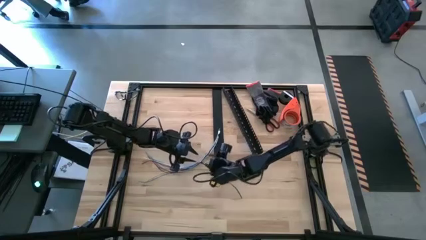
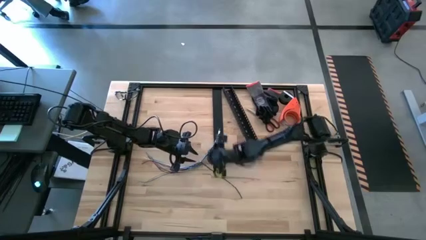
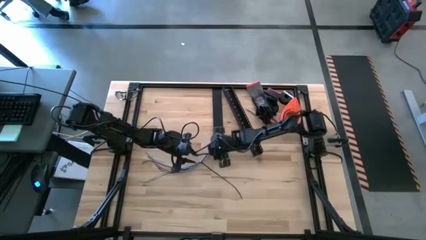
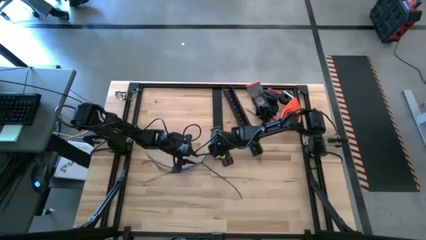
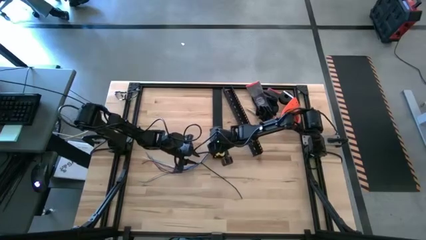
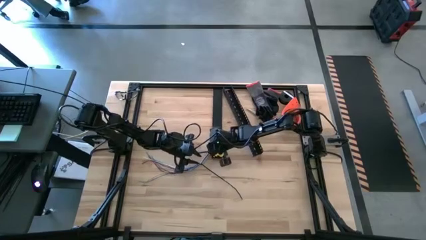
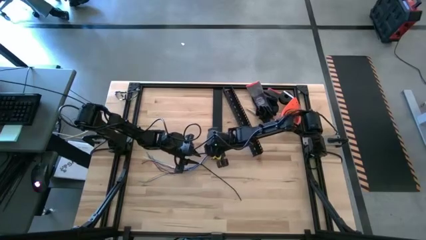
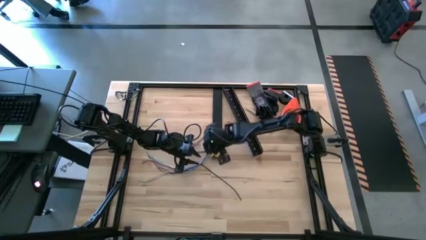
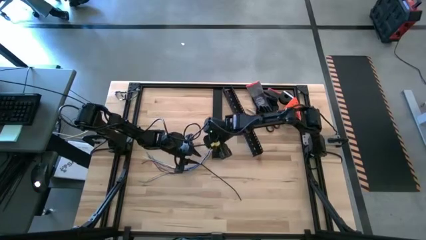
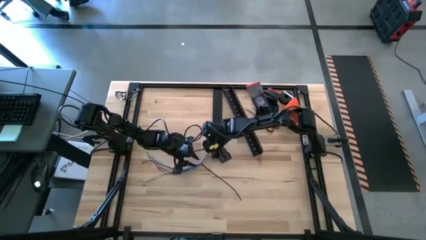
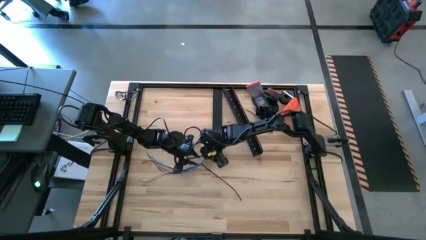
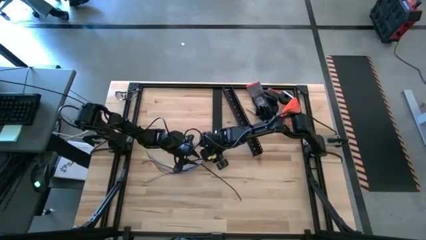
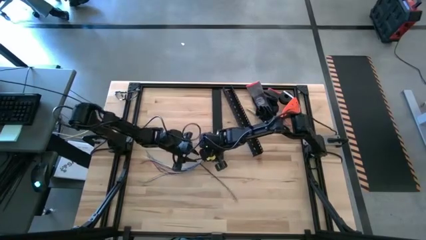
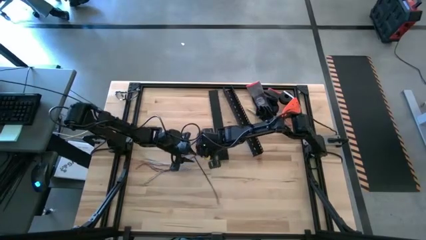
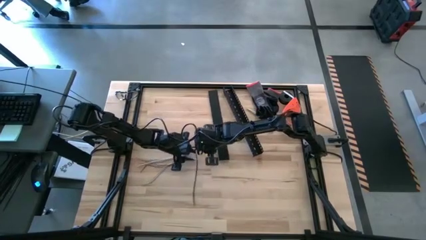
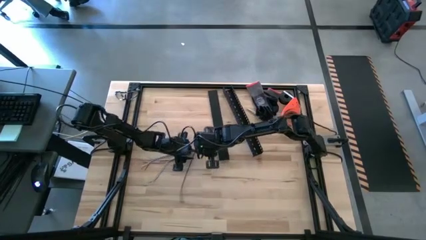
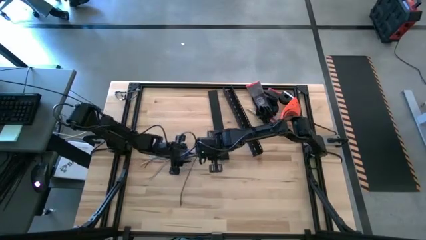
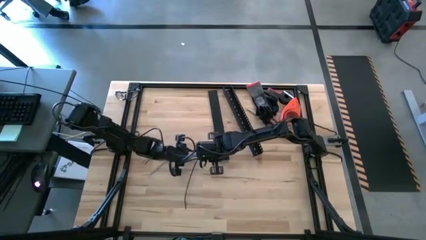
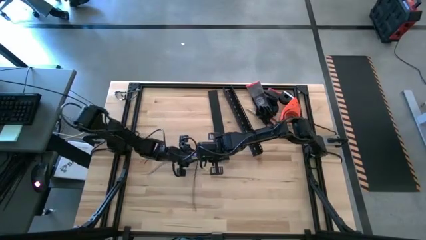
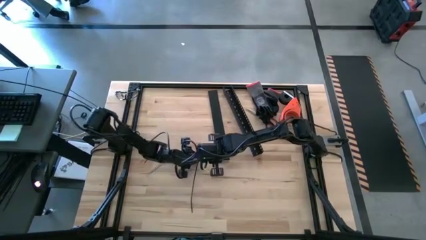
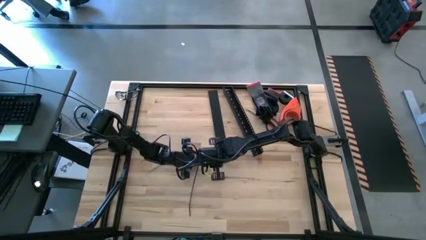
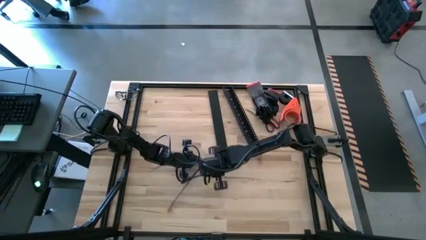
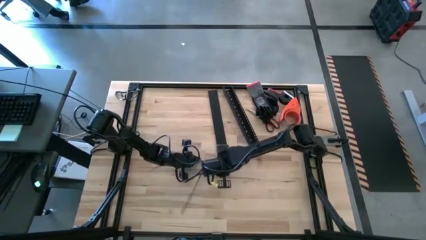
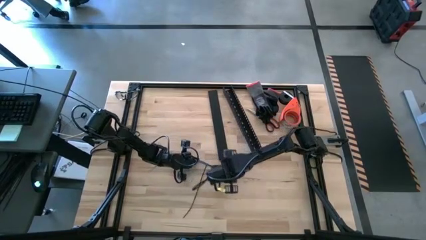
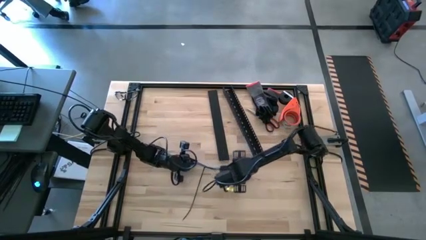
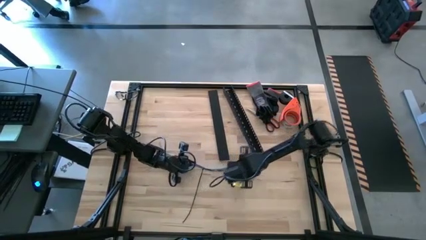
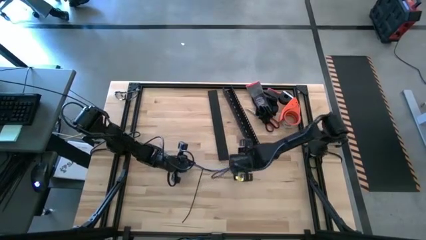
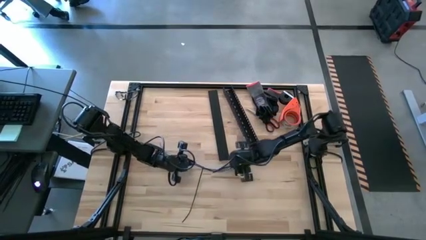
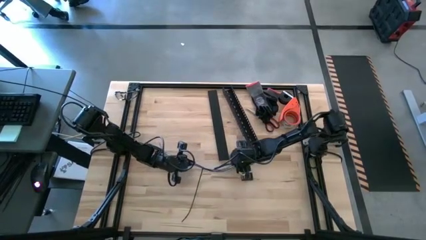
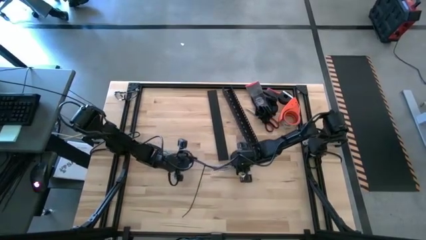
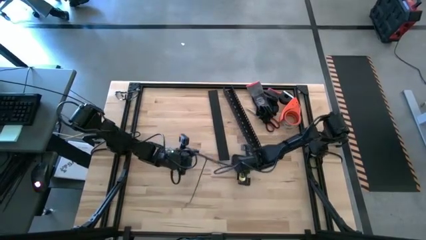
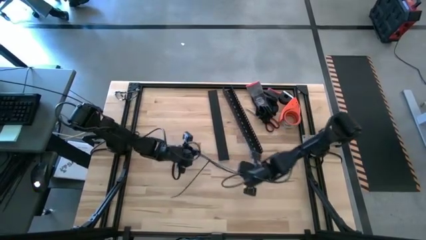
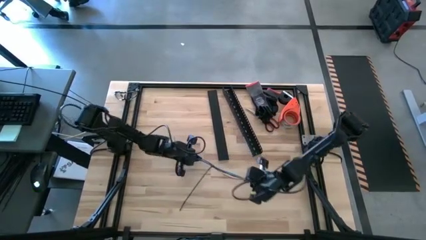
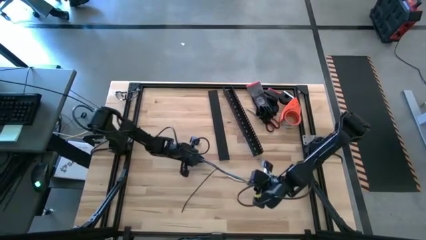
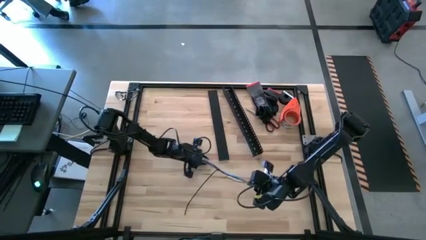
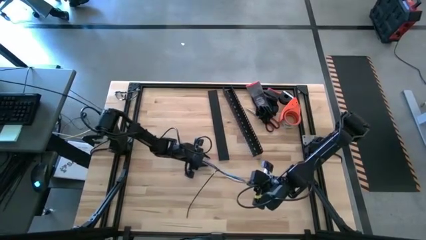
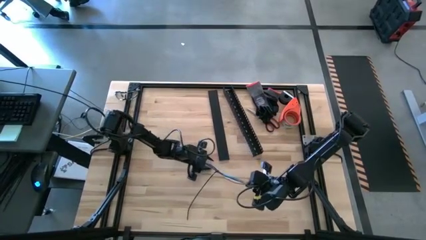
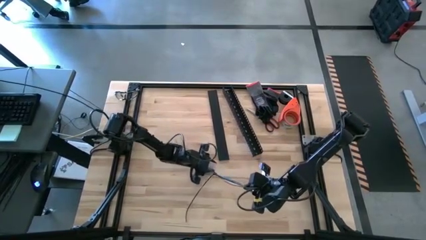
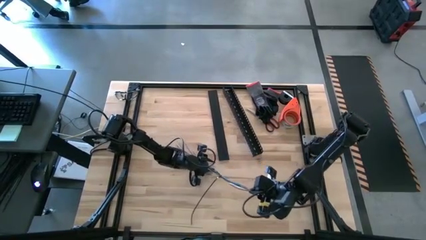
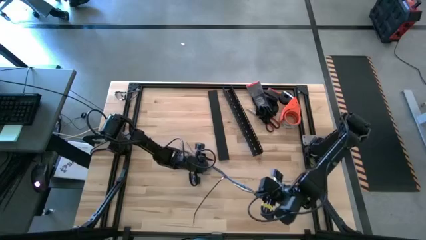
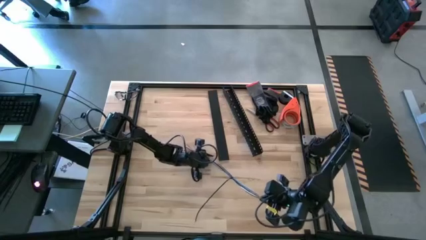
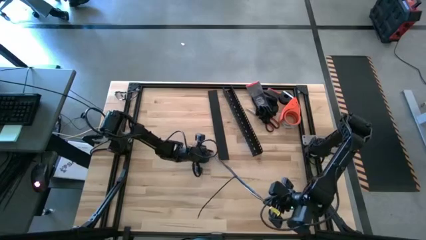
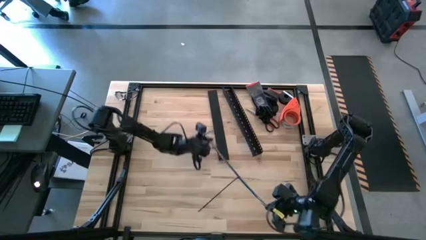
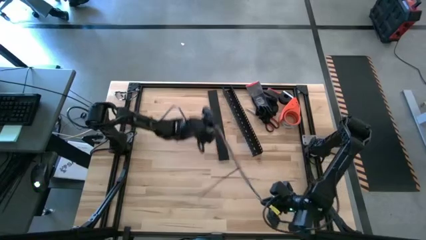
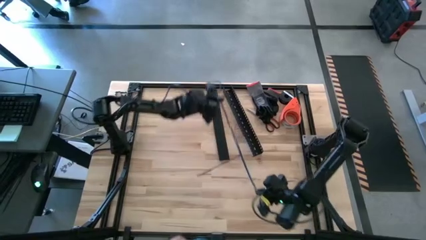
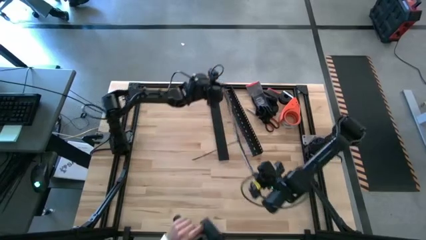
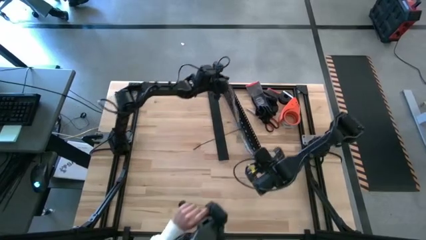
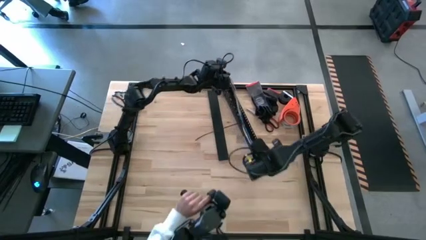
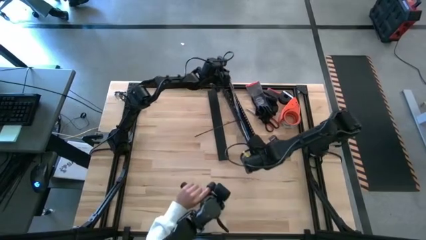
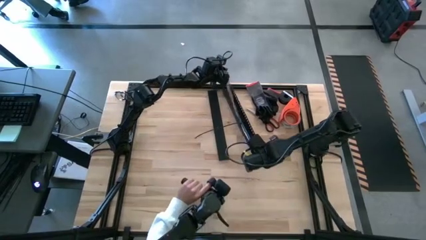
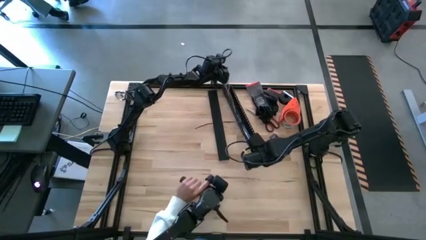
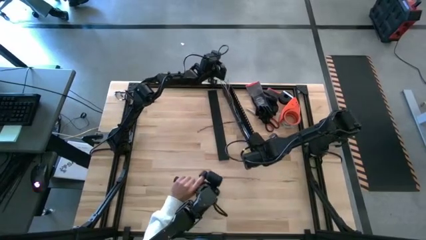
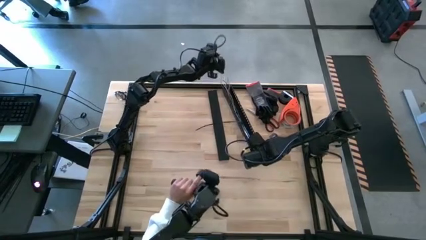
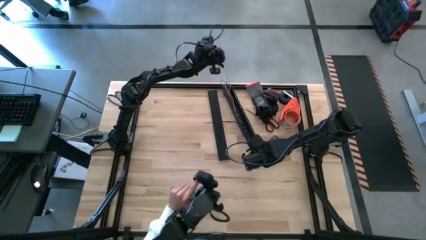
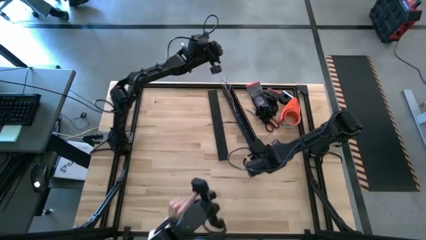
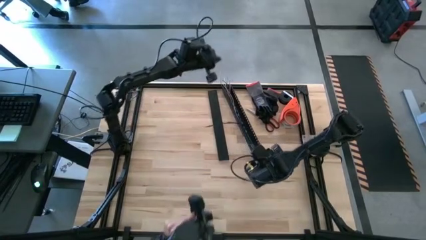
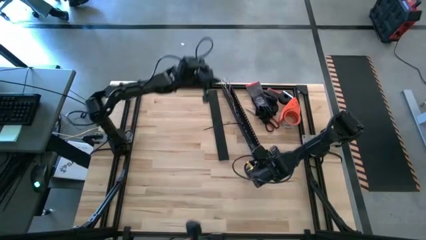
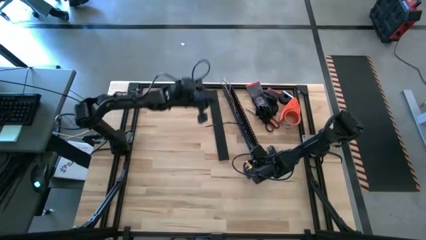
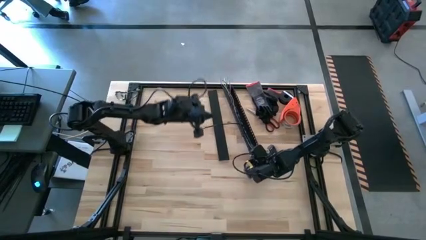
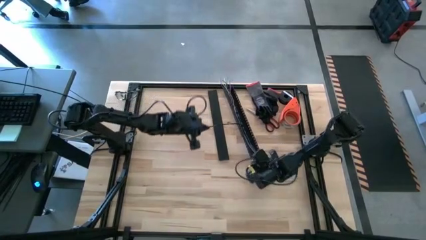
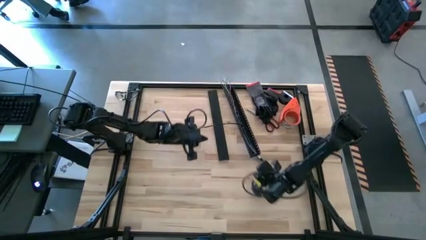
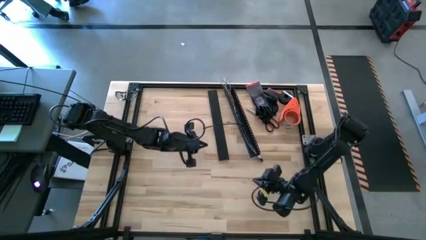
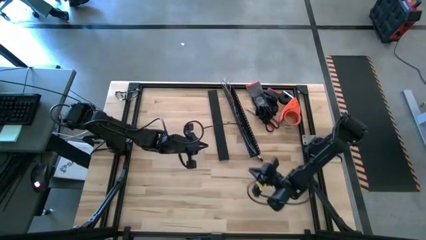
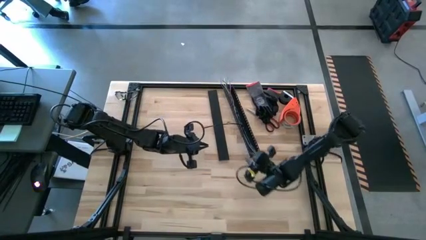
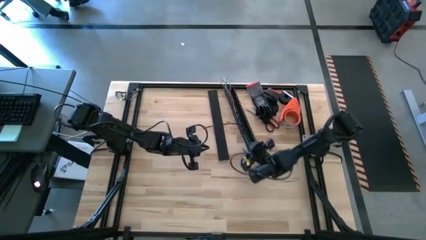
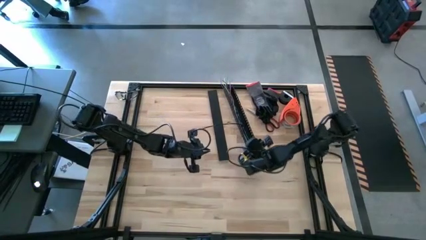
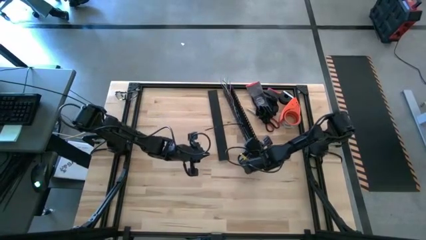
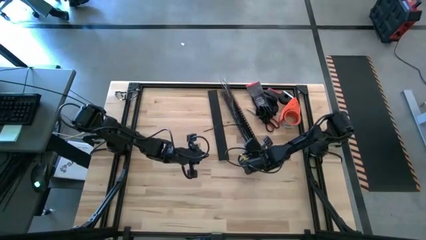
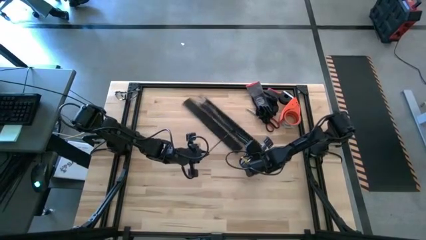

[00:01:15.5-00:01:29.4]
Task: Ziptie cables
Put the zip-tied cables into the cable duct
